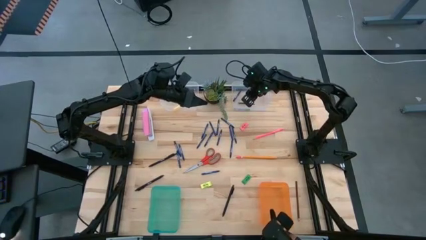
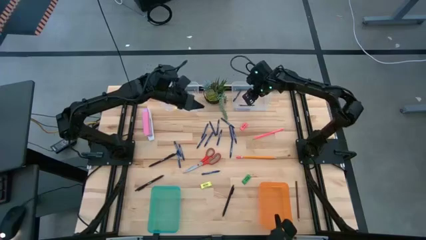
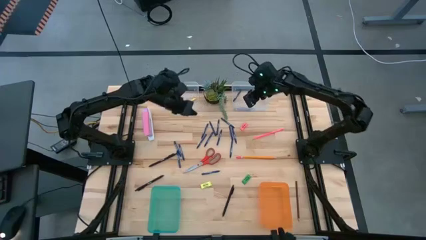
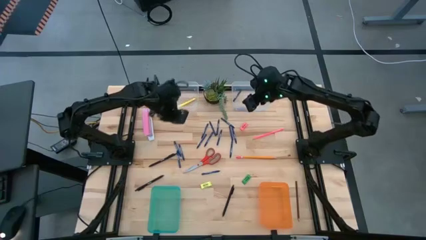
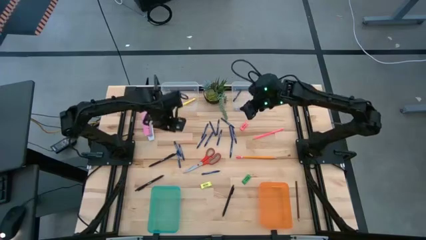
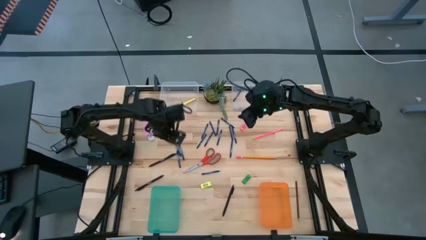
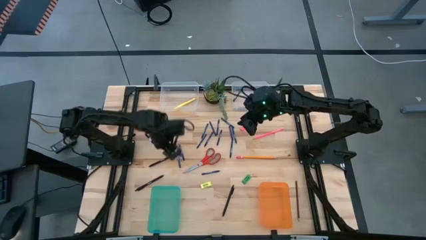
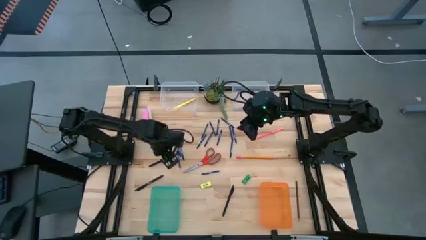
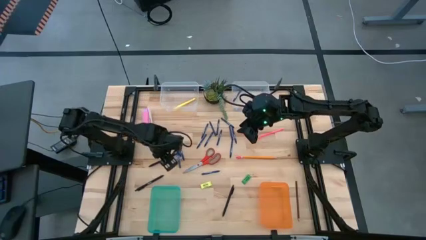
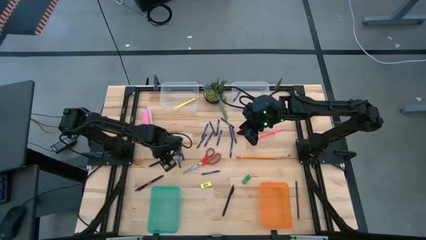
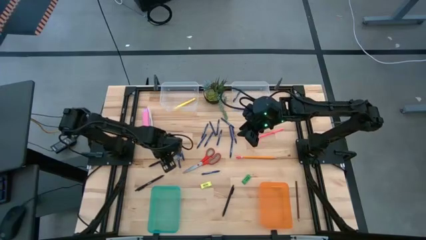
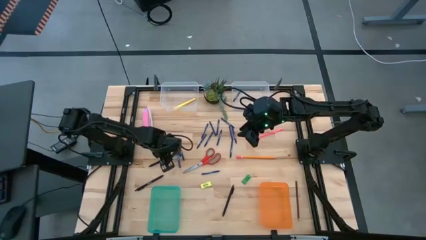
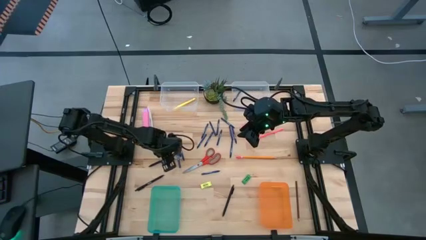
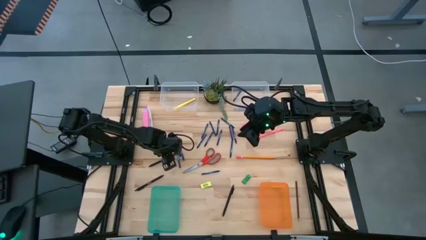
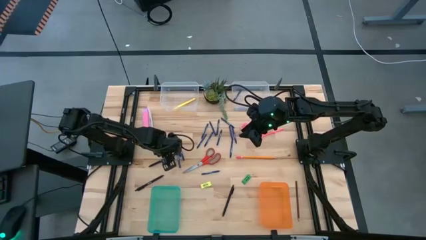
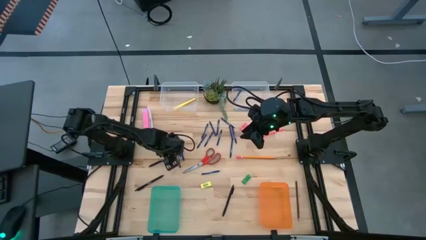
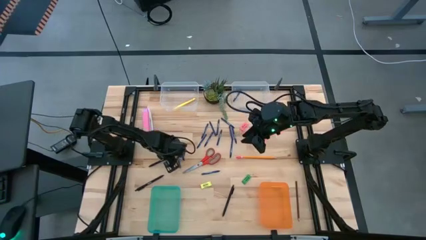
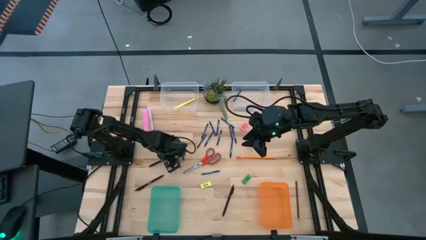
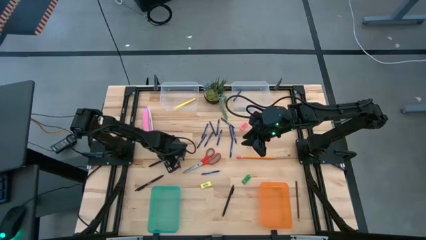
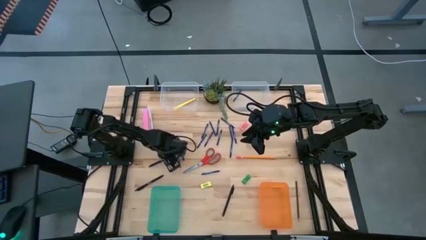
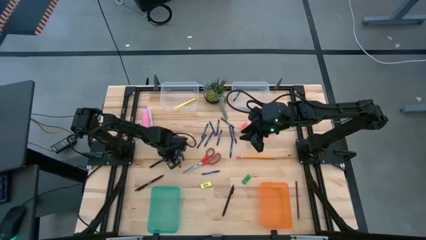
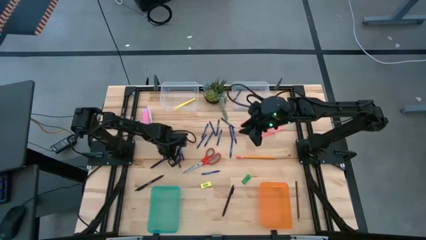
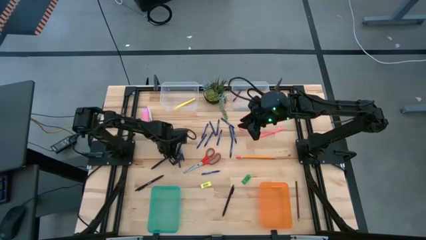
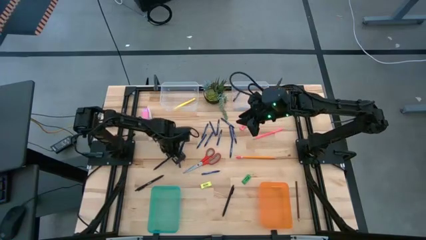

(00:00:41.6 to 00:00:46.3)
Task: Sort crayons/erasers/pens/pencils in bins
Put the black pen into the left transparent bin

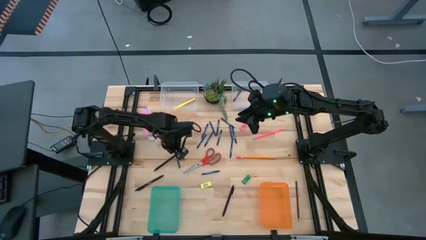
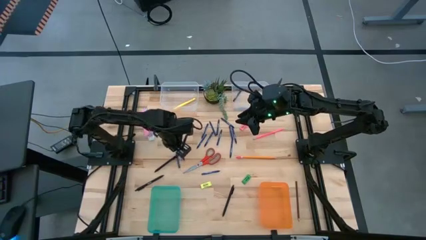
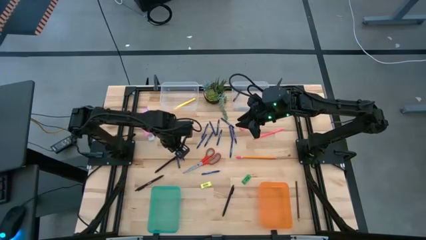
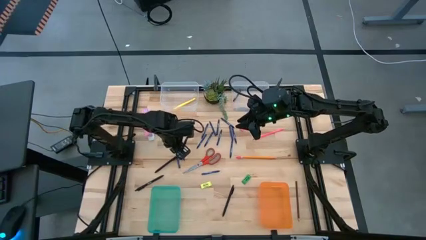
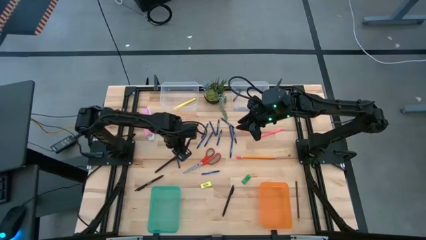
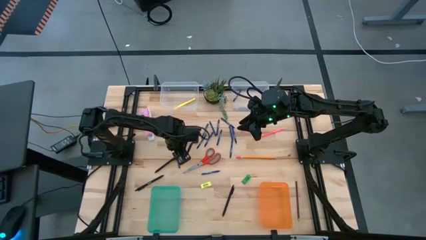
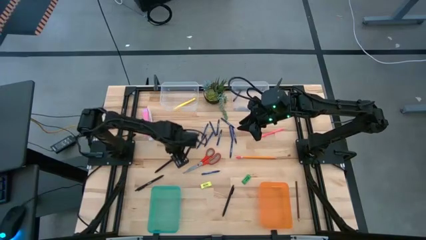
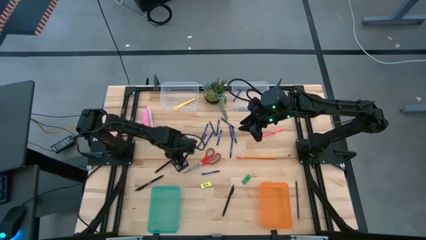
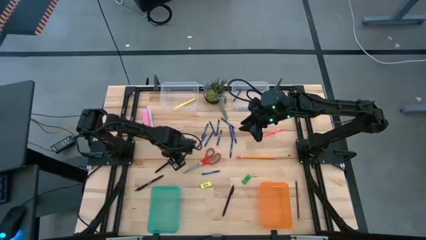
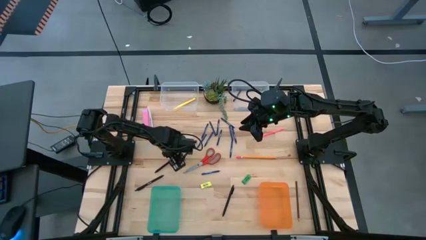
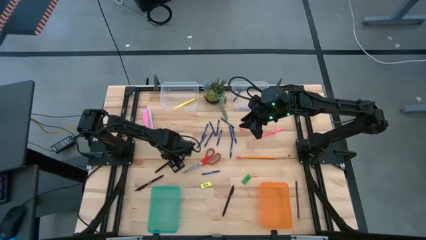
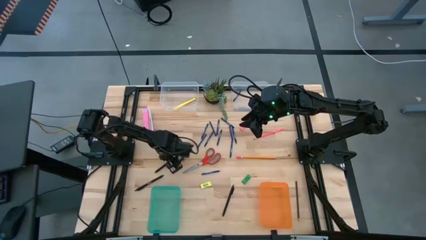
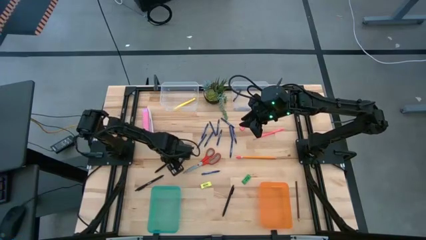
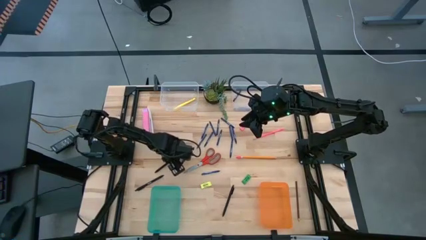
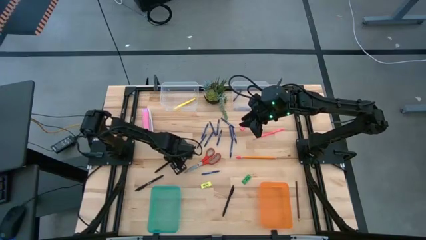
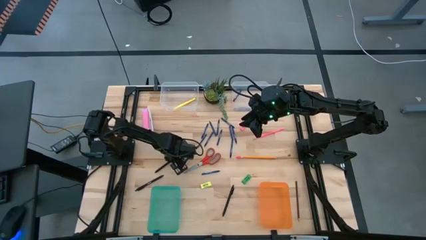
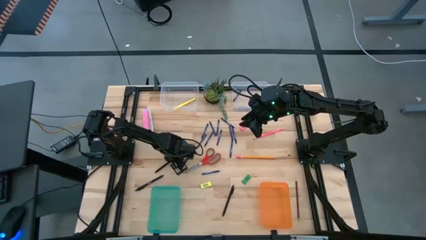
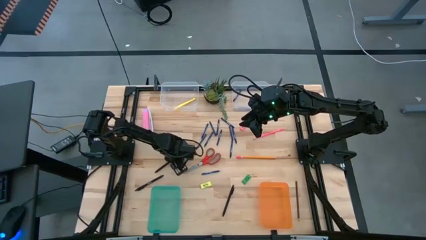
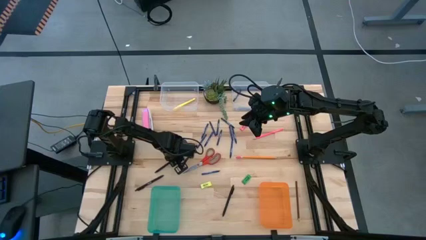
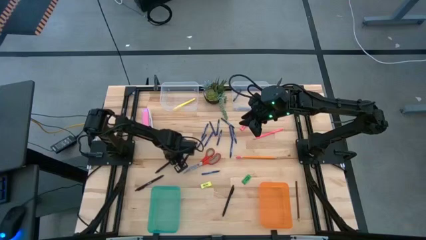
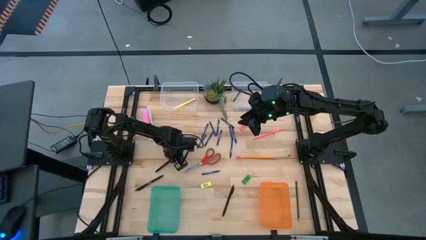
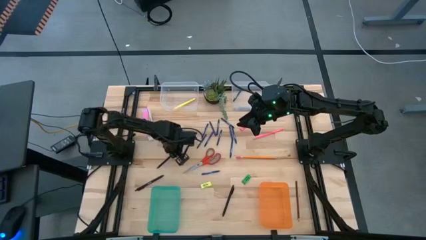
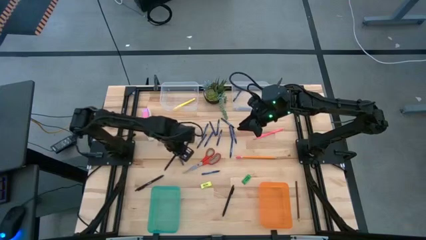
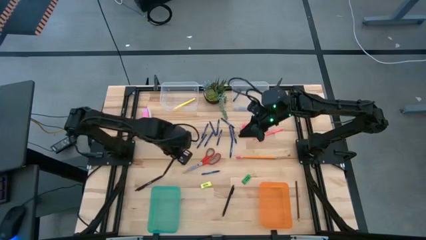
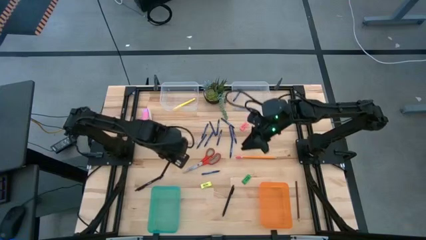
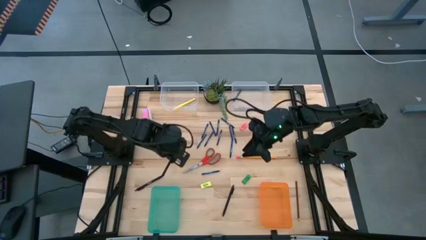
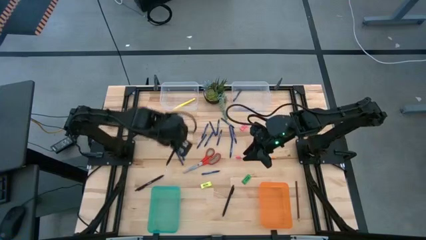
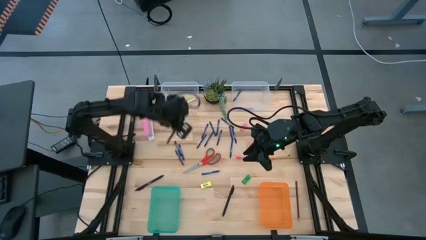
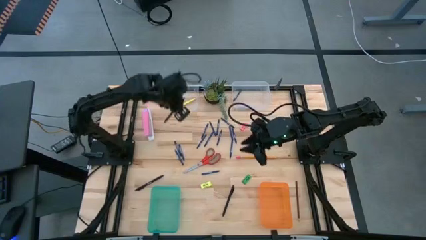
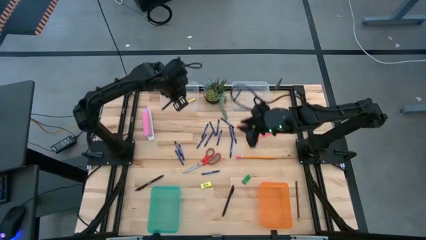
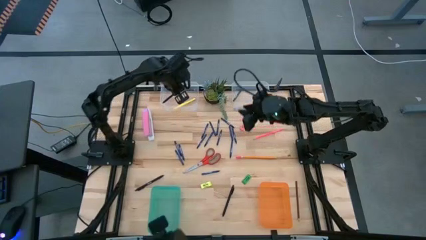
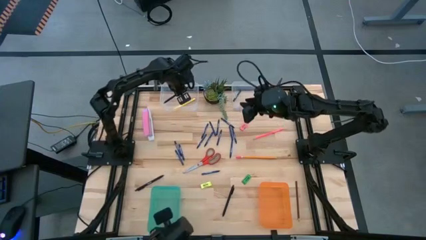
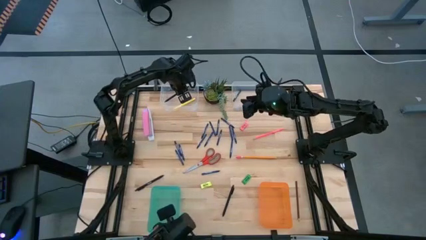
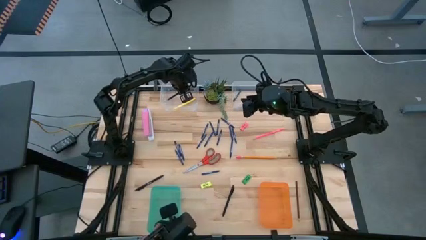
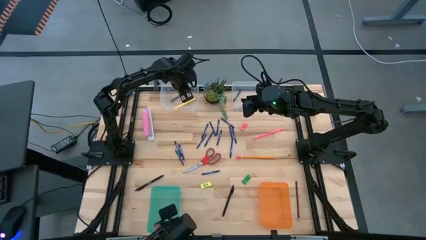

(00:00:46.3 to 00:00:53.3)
Put the black pen into the left transparent bin

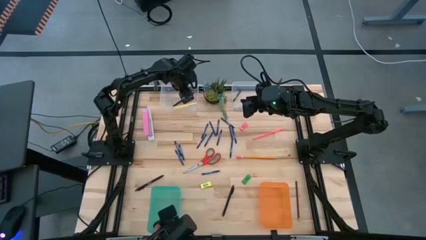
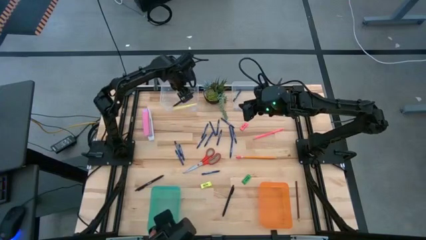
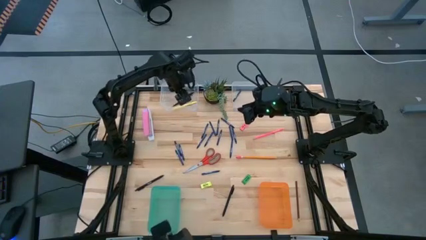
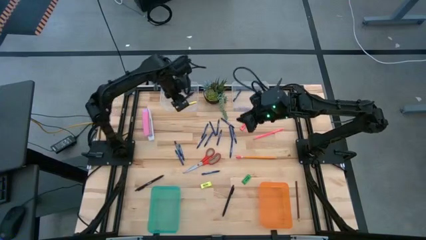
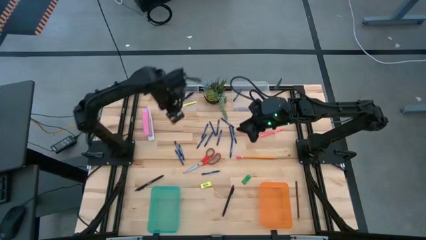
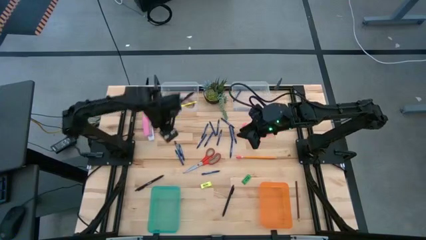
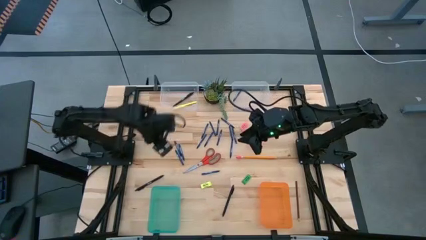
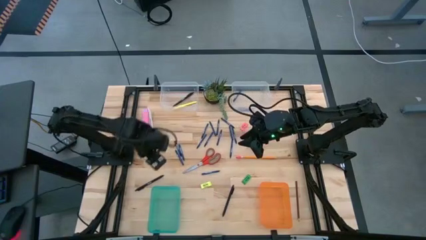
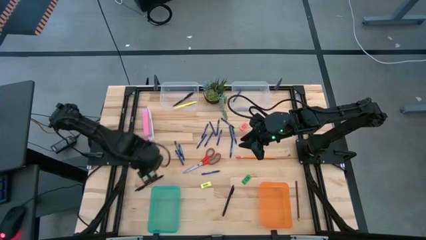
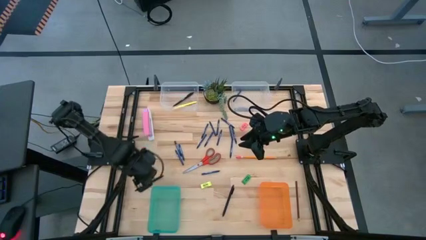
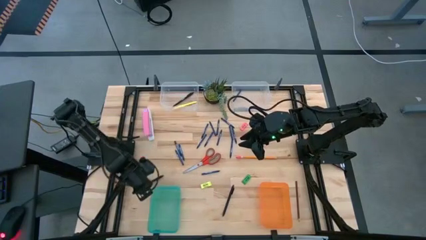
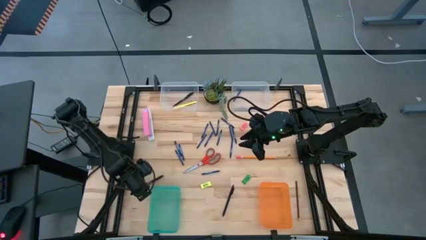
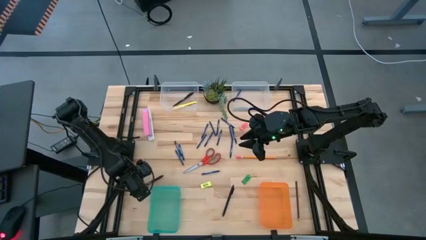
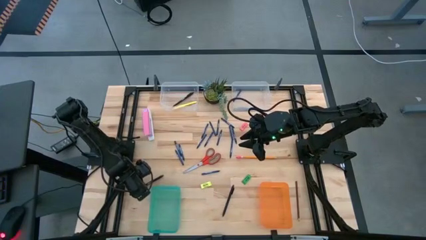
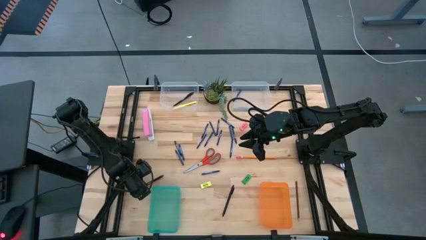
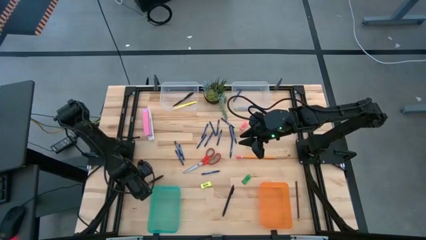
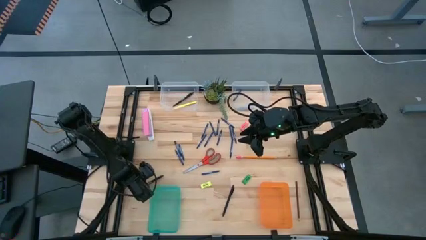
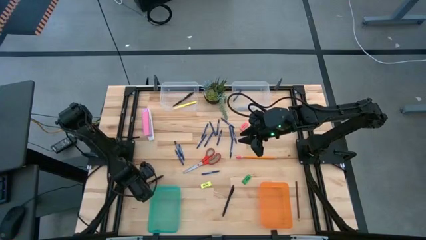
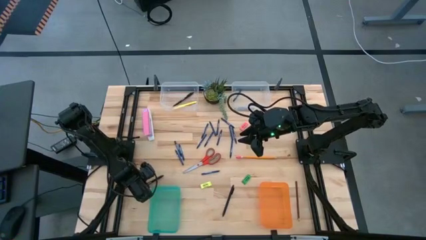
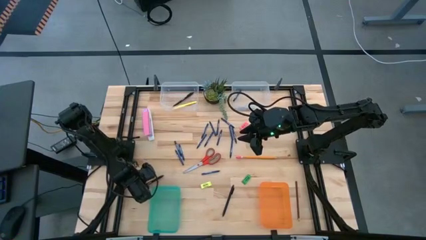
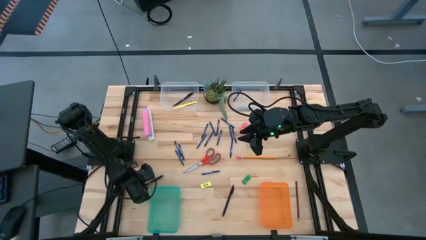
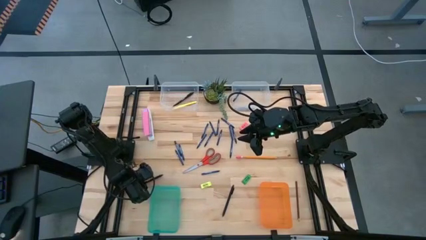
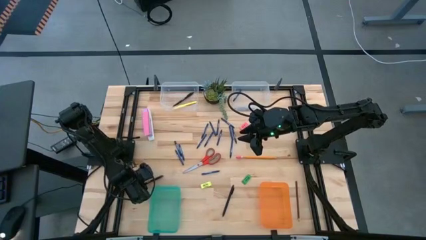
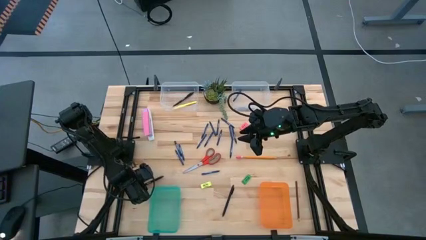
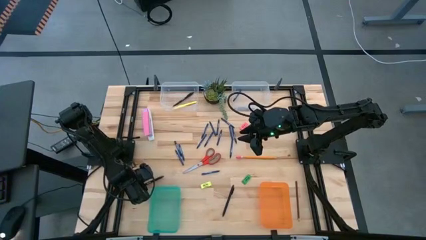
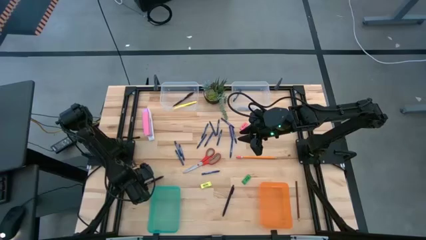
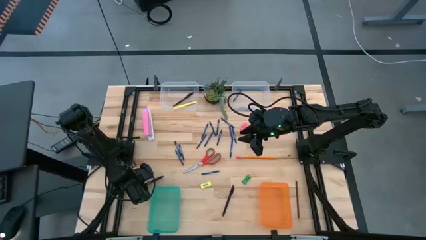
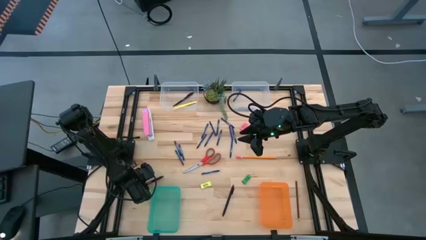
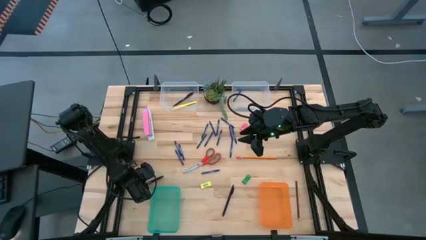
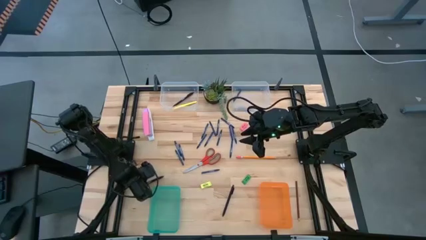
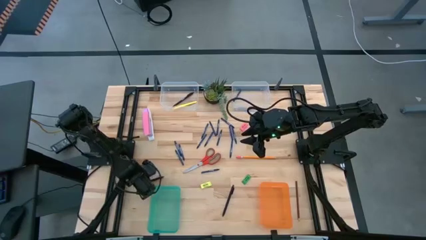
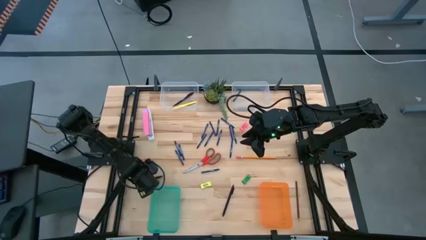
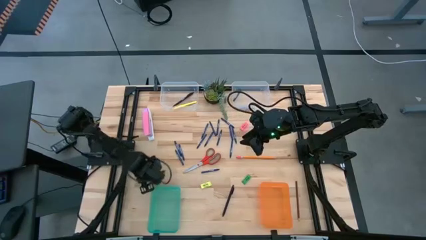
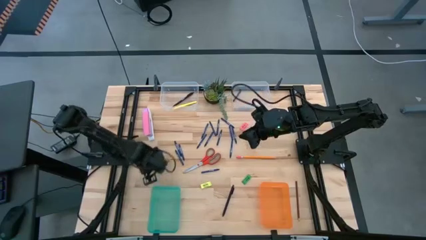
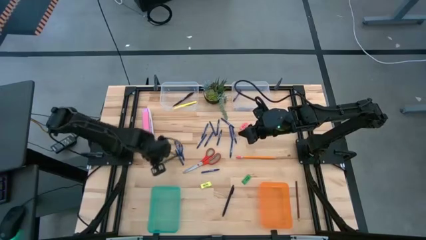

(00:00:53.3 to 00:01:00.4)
Put the black pen into the left transparent bin
